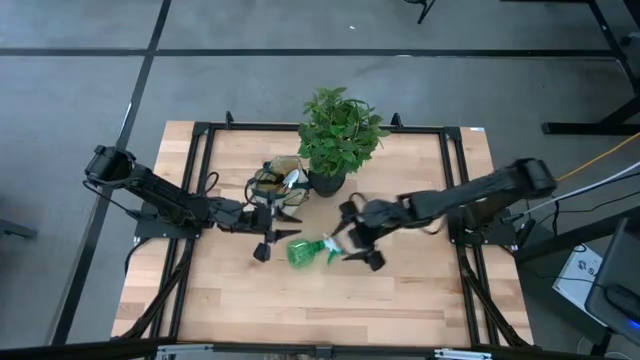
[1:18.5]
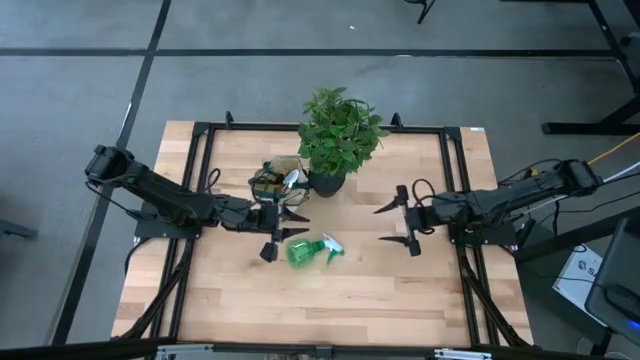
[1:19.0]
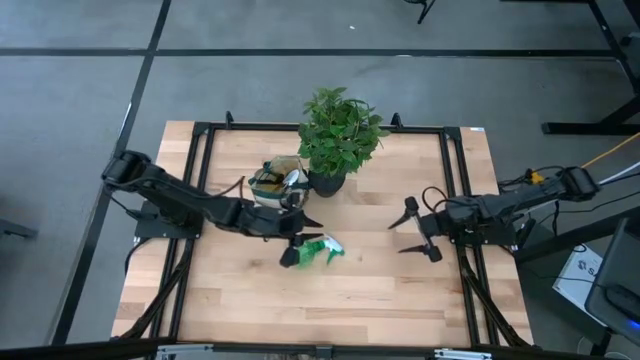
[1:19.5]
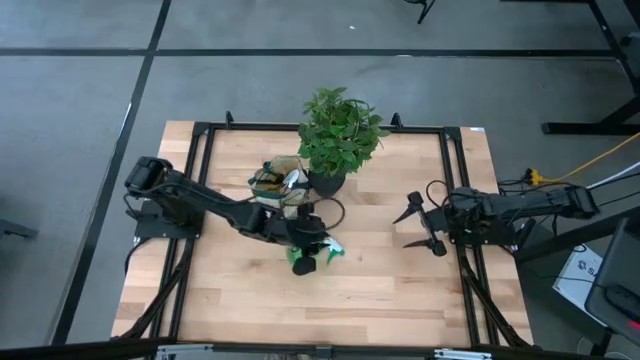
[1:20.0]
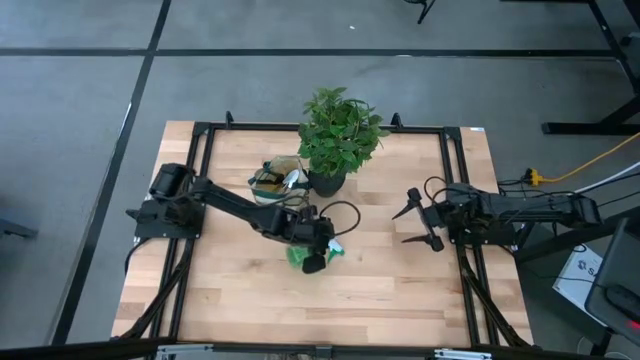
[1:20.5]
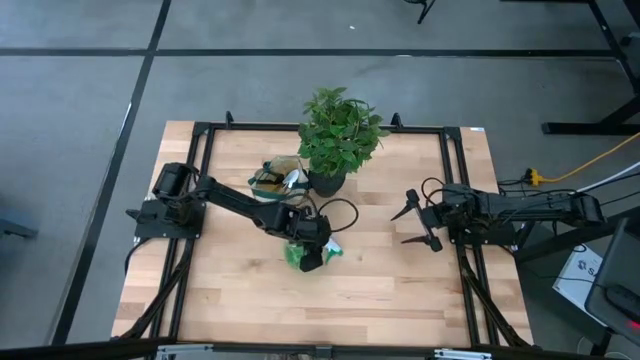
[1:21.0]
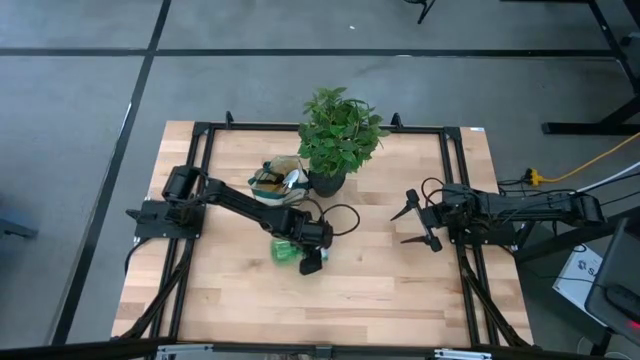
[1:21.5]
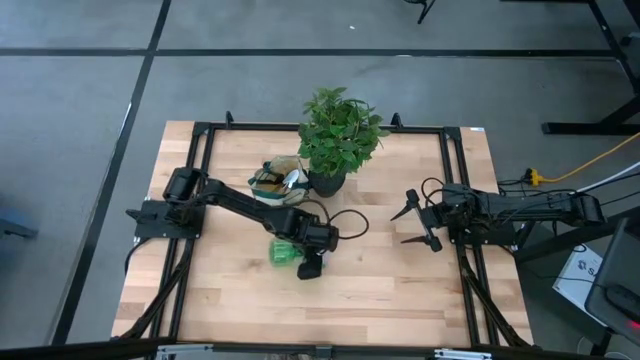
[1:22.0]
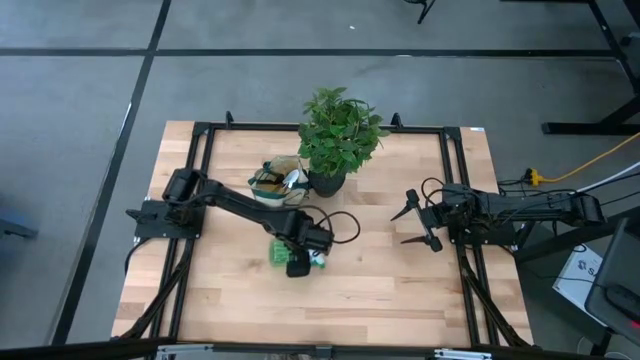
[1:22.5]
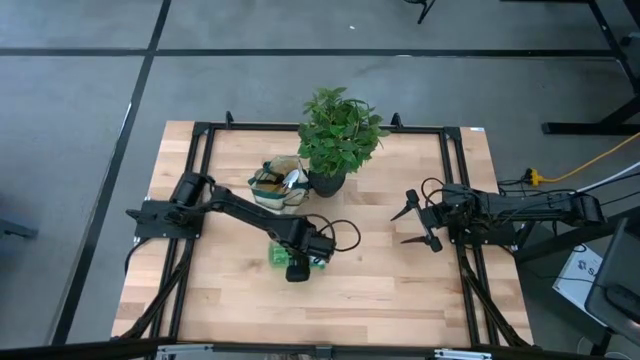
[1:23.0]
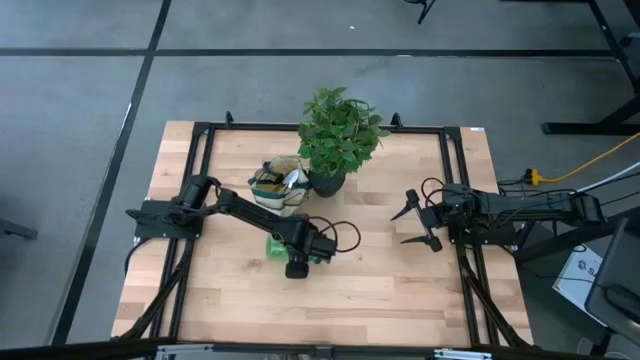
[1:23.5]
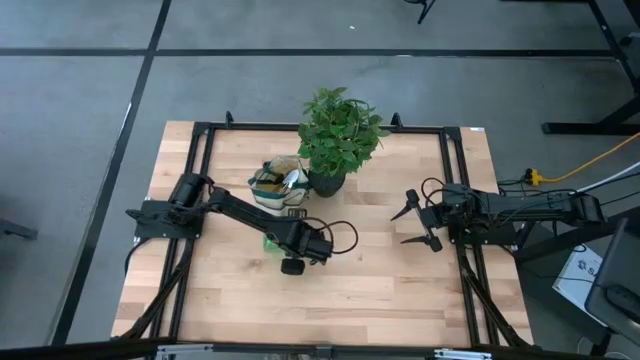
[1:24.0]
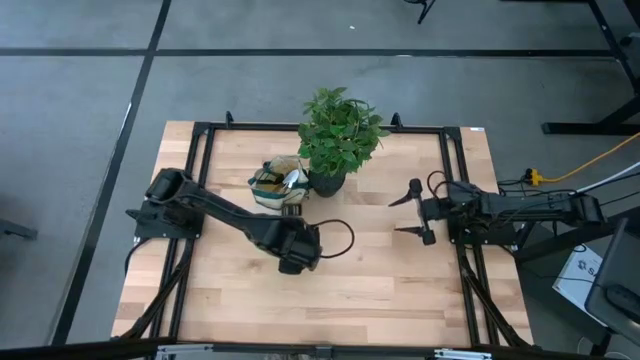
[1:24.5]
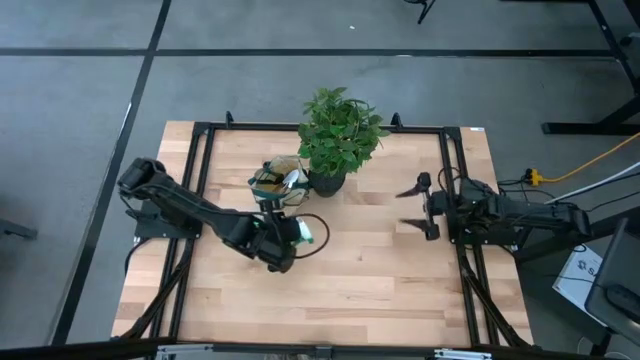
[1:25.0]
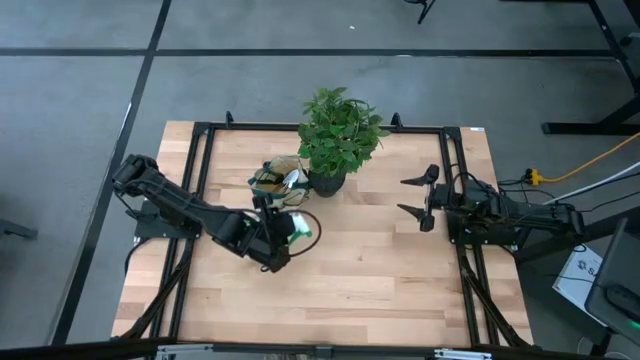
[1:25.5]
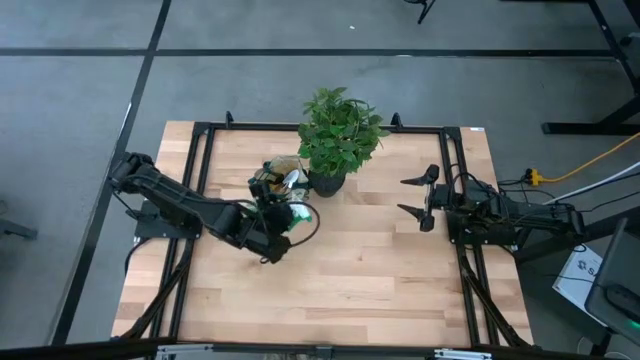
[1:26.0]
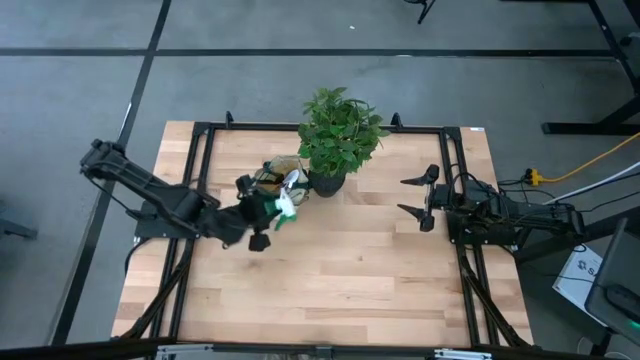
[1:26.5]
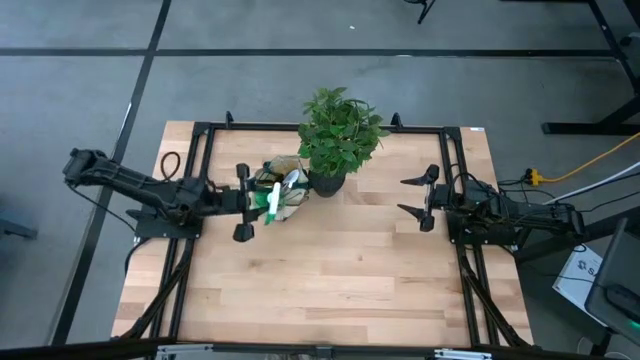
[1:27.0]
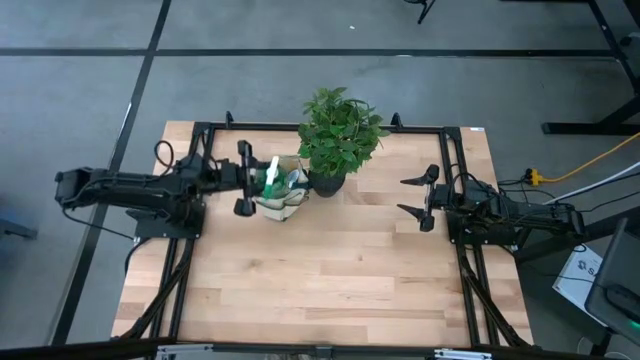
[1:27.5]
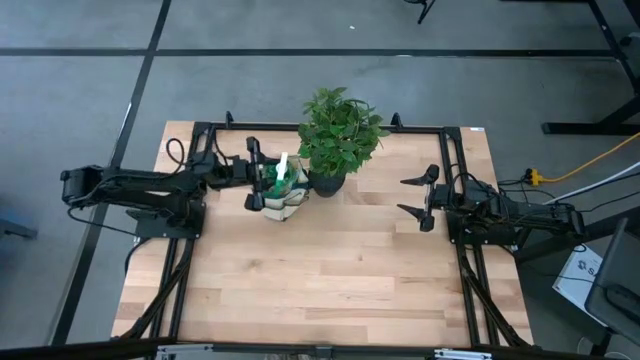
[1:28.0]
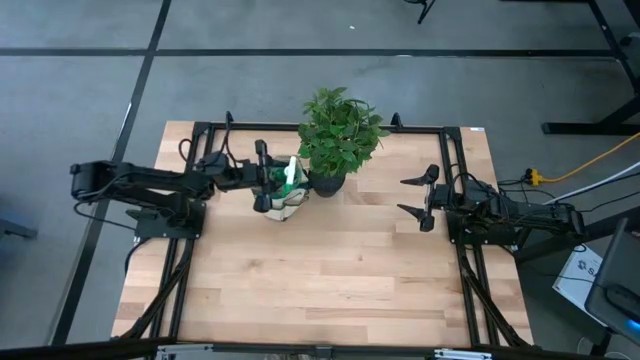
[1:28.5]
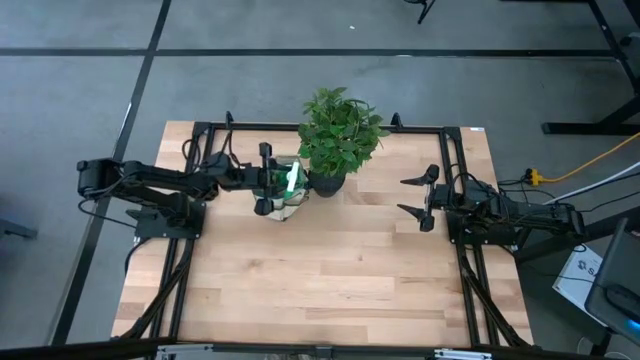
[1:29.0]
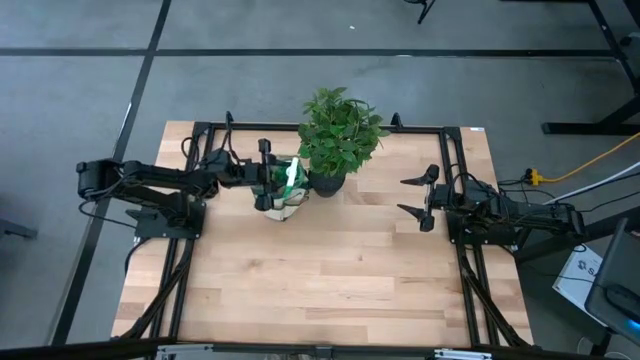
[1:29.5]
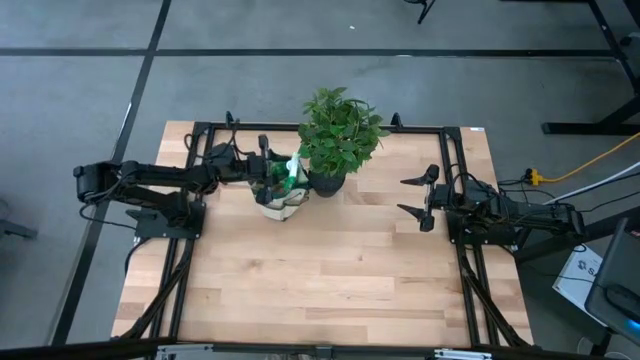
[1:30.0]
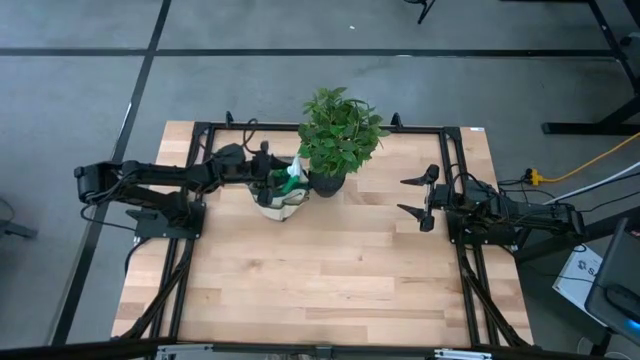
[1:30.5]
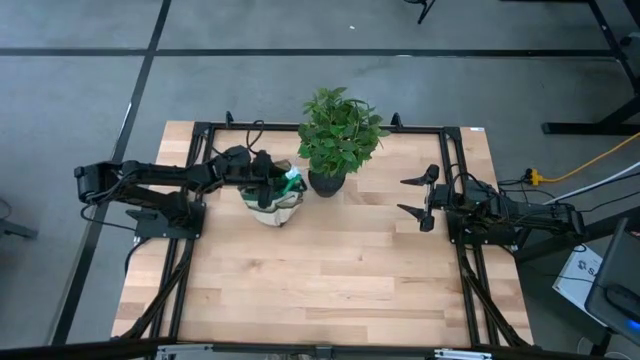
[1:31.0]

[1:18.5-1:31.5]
Task: Pick & Place Garden tools in Gardening bag
Put the green spray bottle into the white bag

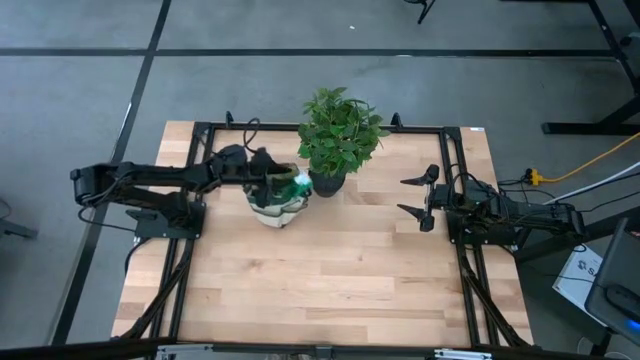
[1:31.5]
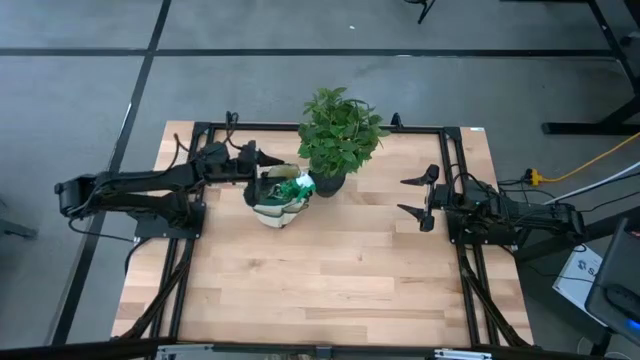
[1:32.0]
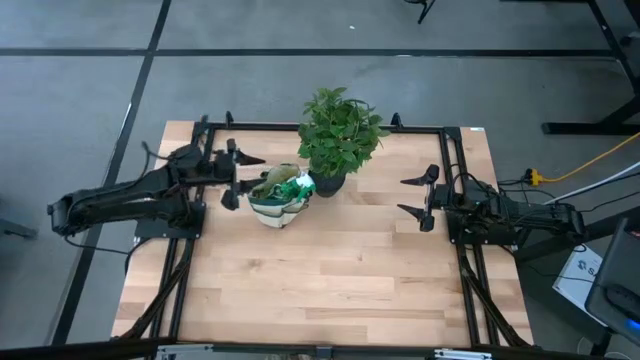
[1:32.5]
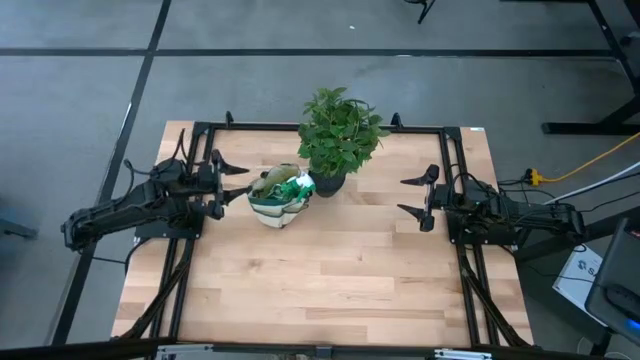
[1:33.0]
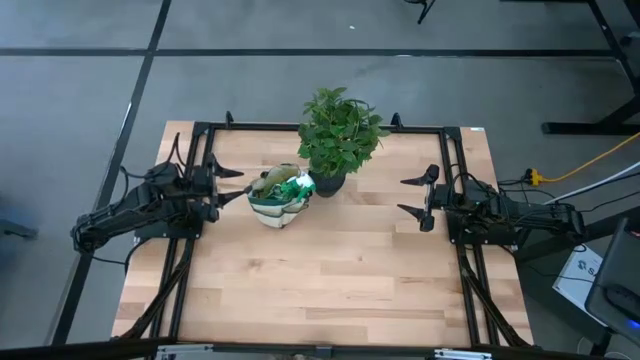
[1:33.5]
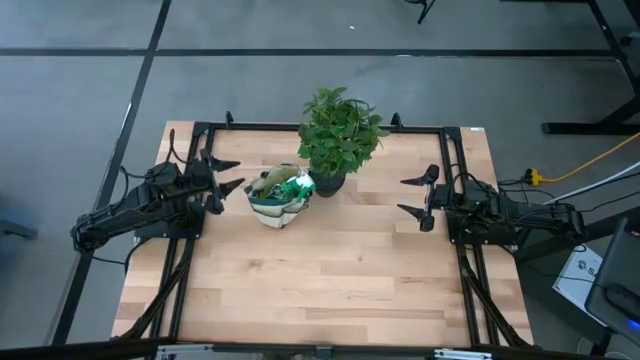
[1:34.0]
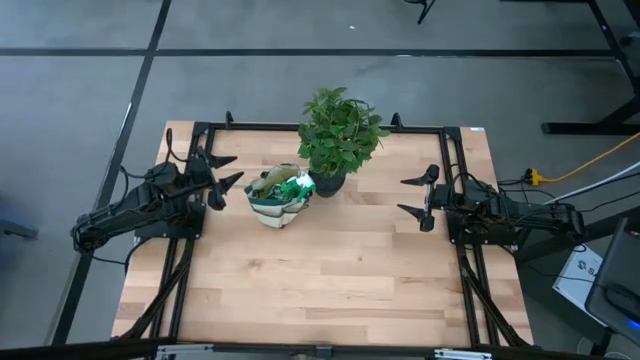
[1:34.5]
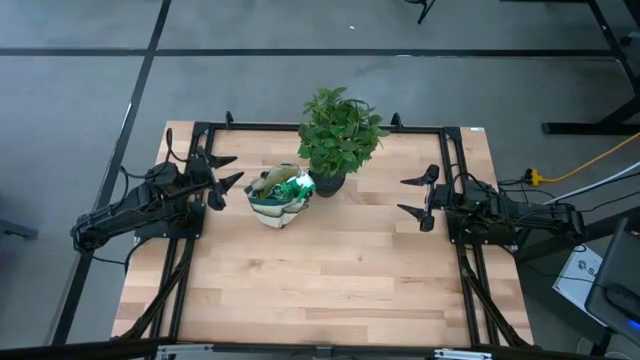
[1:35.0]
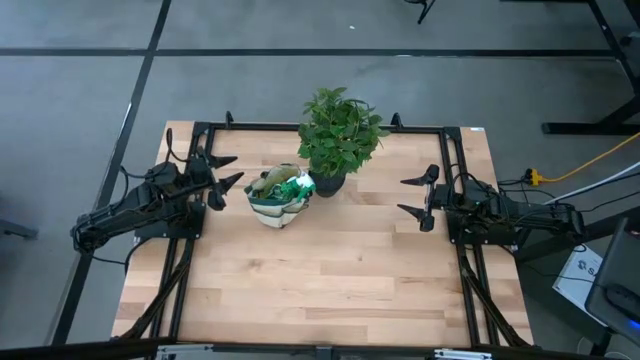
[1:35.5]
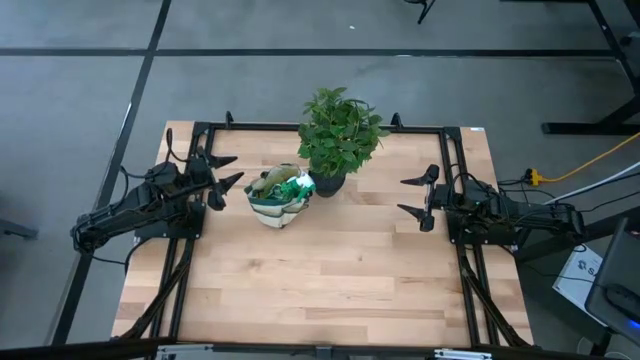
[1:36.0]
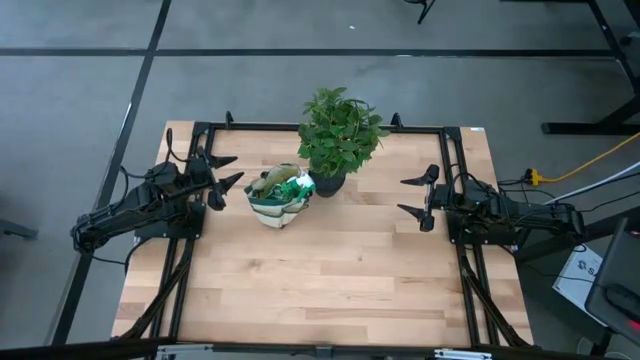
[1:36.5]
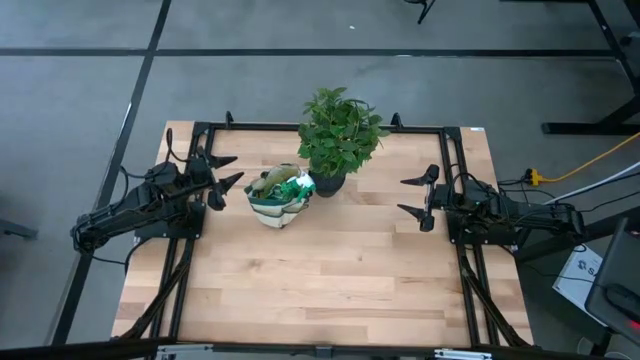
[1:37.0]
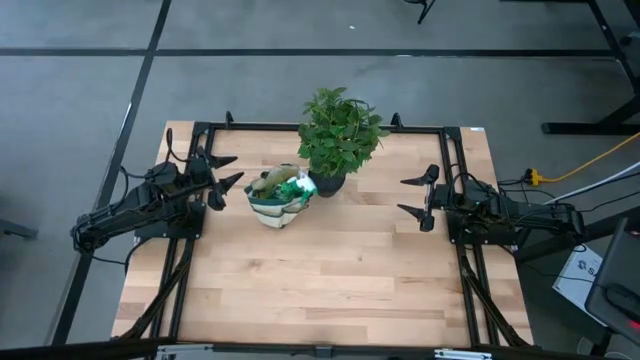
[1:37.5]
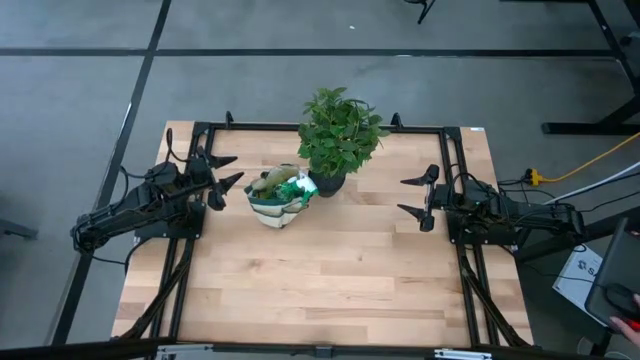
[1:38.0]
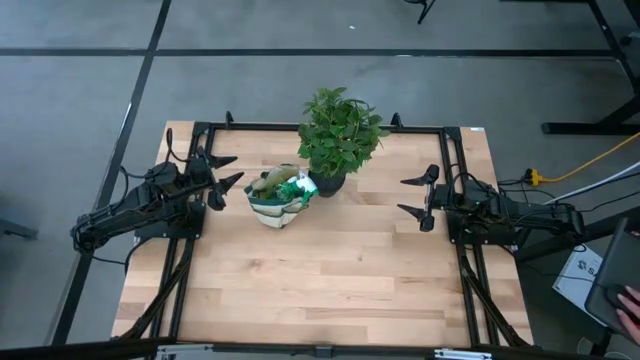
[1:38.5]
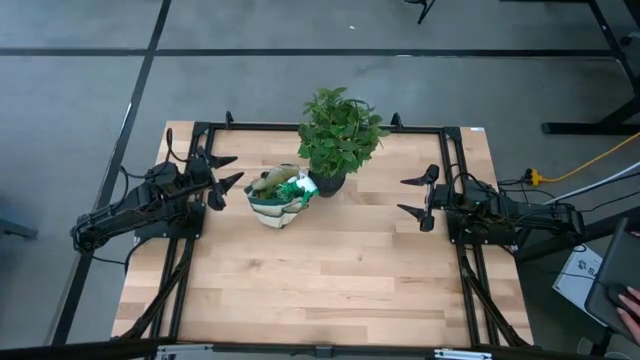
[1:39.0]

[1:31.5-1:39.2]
Return to Home Position

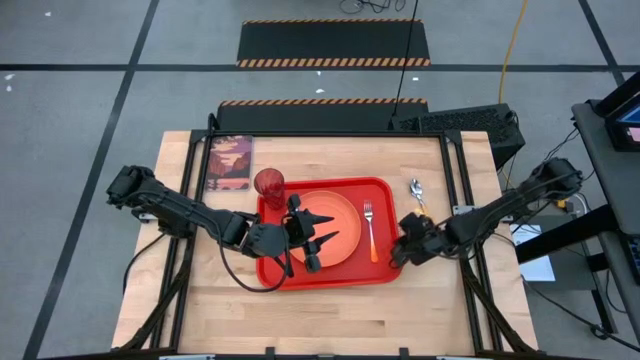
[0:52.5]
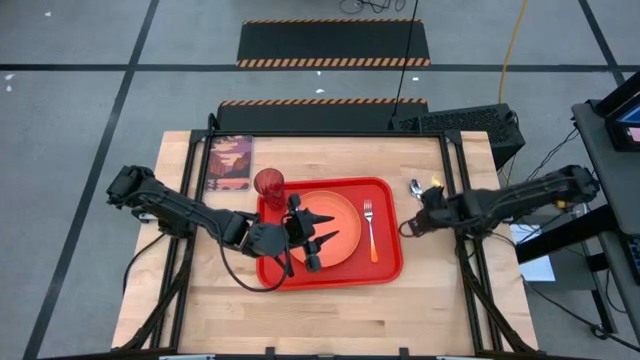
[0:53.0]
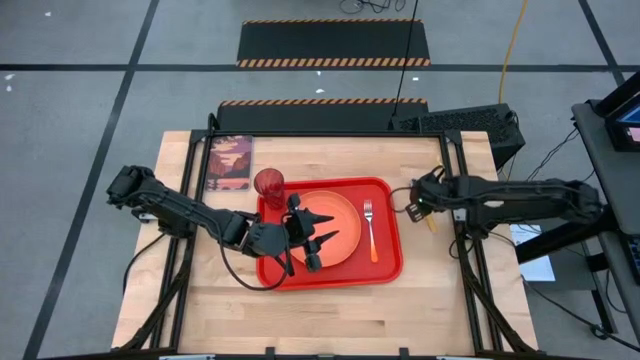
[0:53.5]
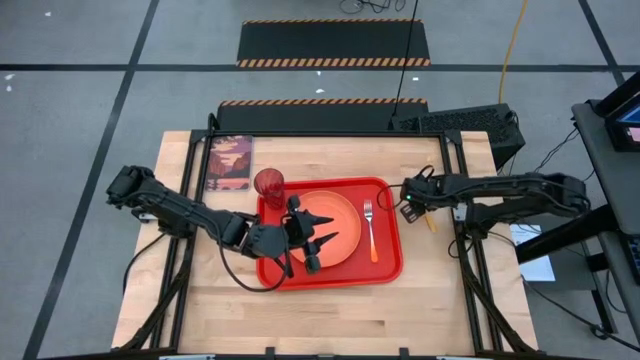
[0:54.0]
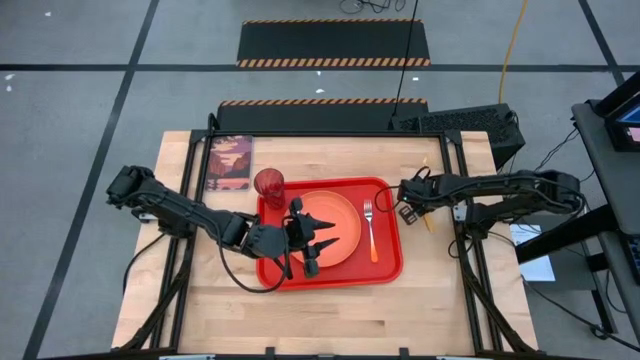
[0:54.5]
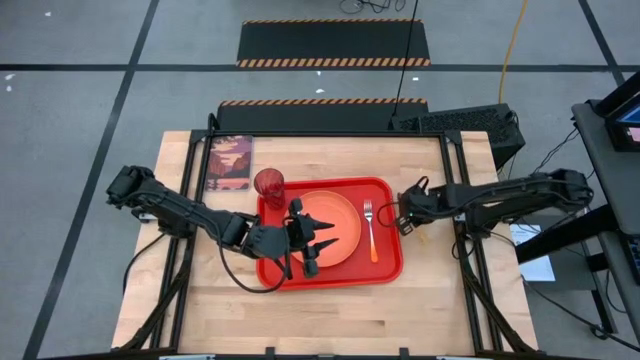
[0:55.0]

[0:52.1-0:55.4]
Task: Pick and place plate/cup/fork/spoon on tray
Put the orange spoon on the right side of the white orange fork
